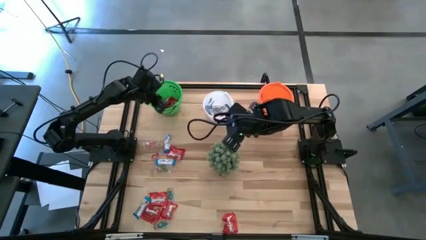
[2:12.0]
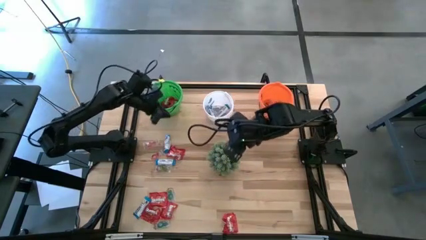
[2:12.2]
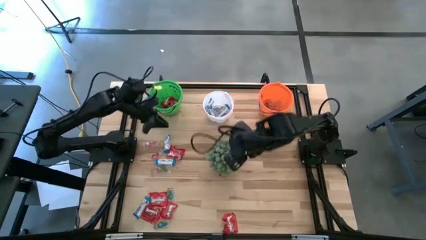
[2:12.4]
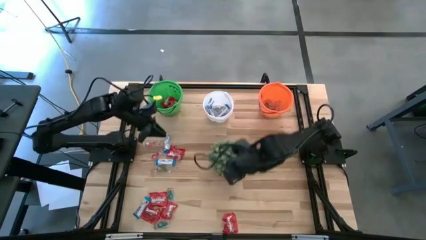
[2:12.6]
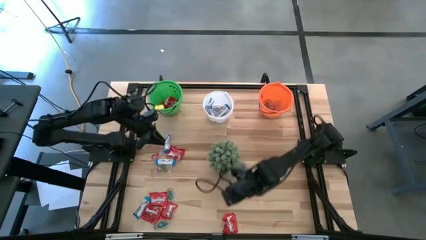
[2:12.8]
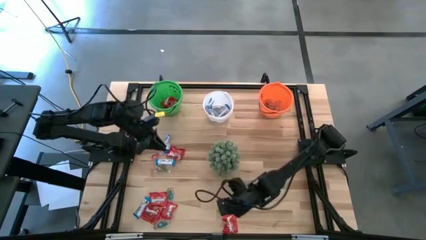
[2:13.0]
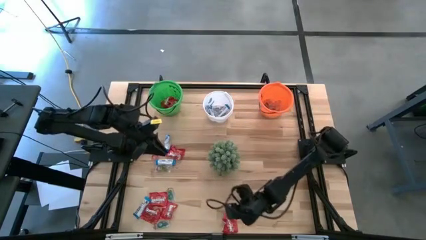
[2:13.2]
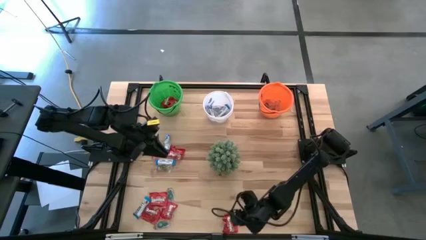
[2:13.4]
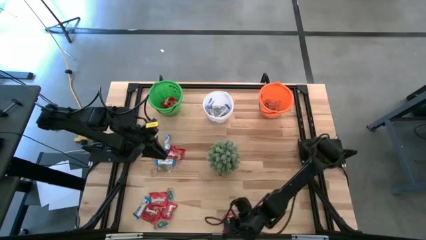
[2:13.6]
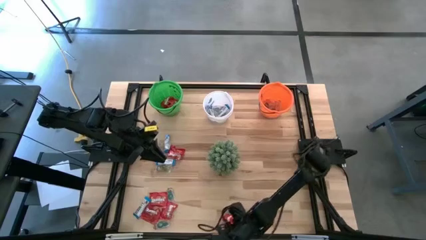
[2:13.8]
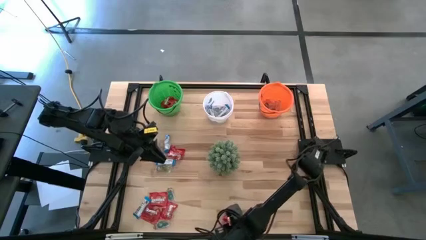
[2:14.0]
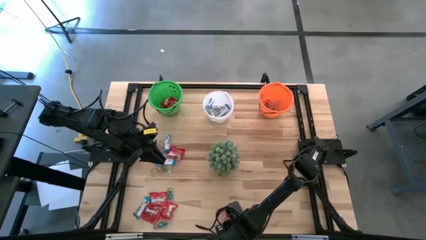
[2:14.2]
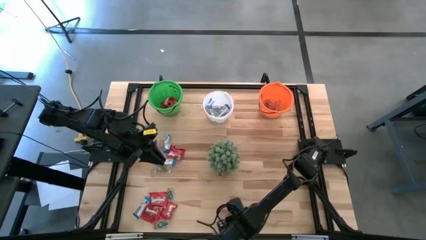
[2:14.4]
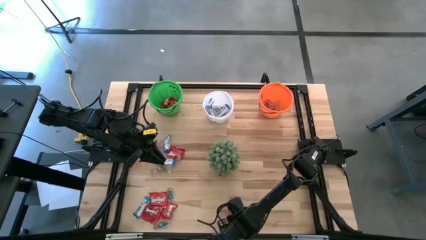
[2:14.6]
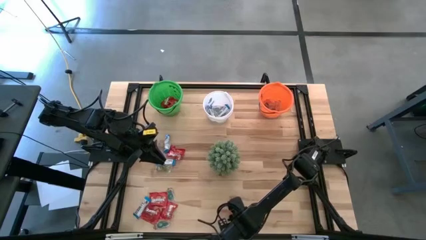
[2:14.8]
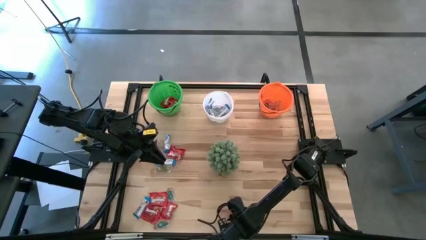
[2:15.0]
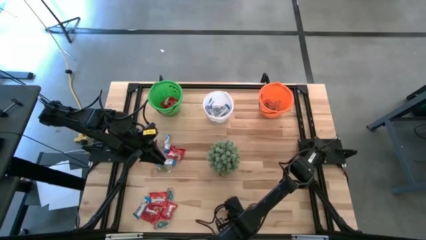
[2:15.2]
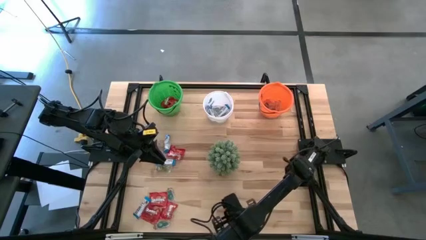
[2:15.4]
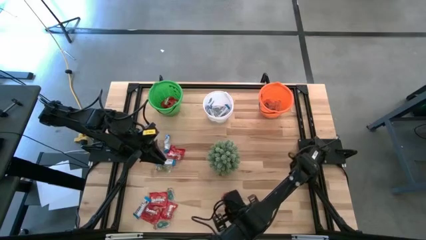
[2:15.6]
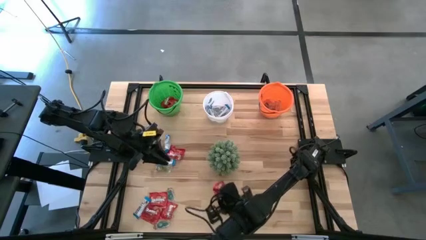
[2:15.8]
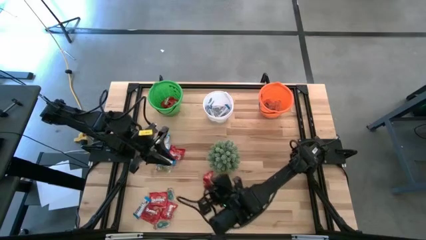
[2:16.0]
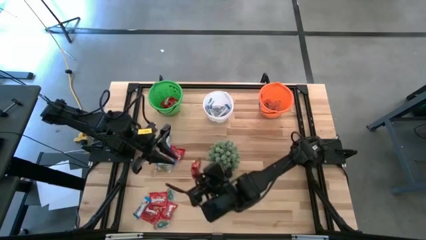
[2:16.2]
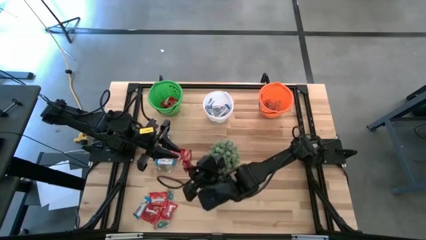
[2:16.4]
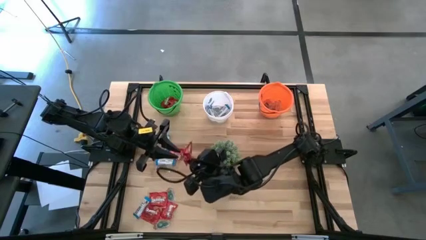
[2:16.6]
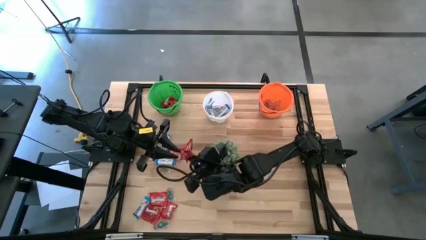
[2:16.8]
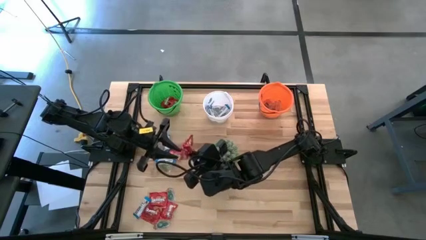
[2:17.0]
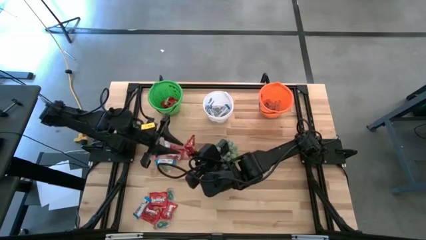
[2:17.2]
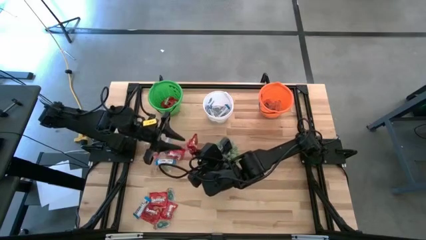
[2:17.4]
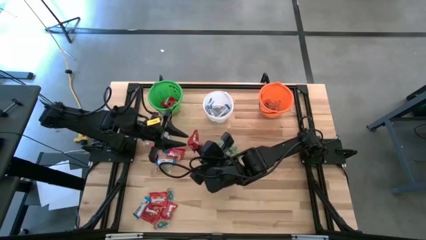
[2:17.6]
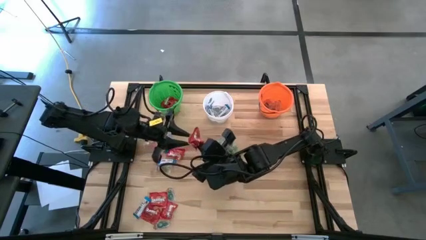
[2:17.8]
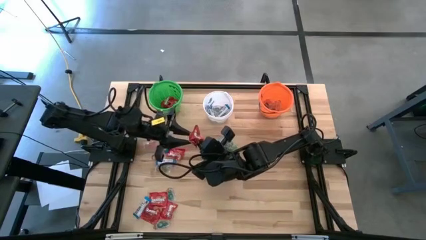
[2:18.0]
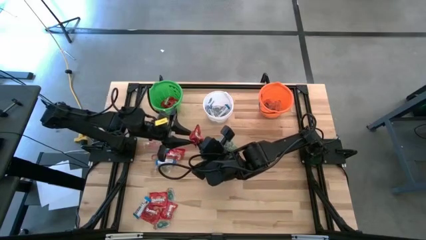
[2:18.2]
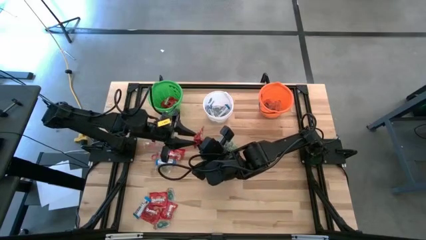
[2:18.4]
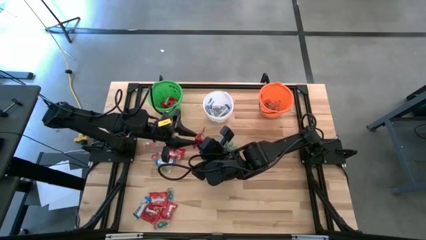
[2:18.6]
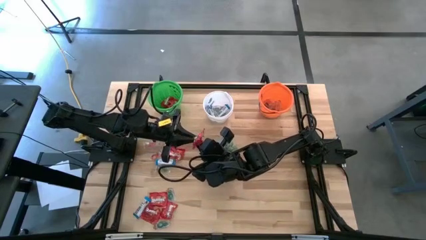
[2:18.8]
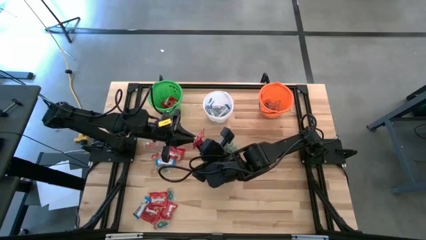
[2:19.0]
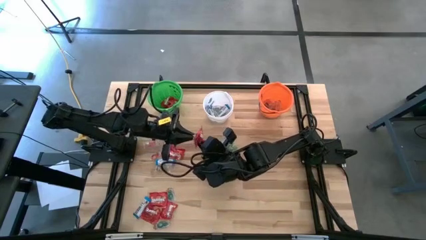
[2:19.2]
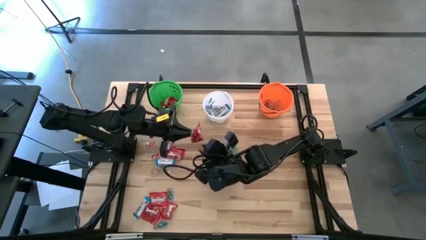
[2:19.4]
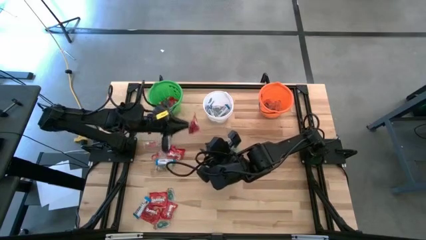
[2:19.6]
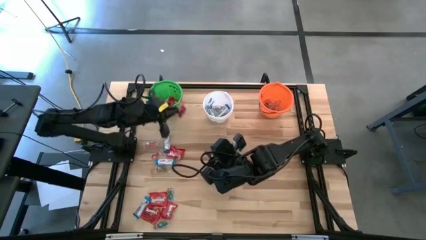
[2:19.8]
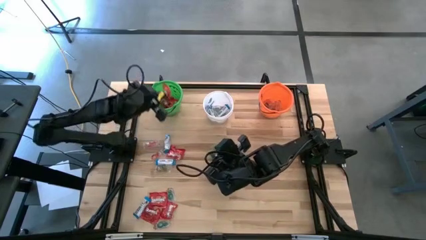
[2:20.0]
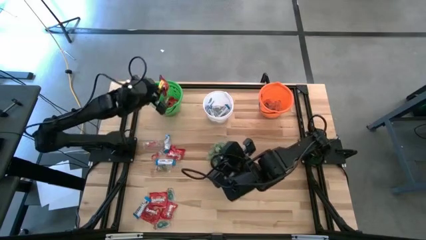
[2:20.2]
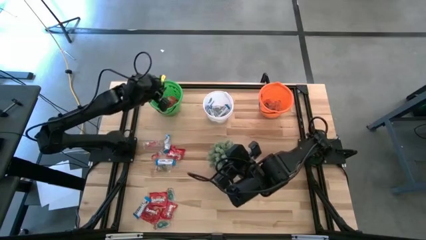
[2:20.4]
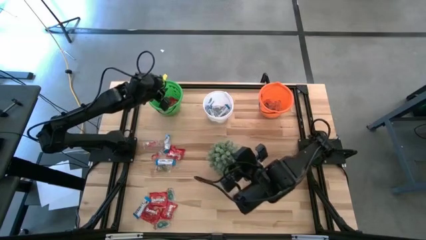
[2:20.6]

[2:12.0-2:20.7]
Task: Sort candy
Put the red candy into the green bucket

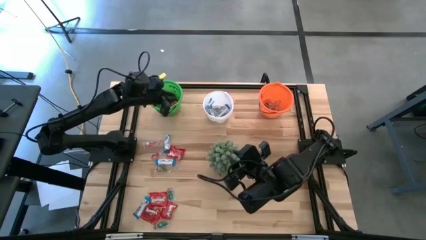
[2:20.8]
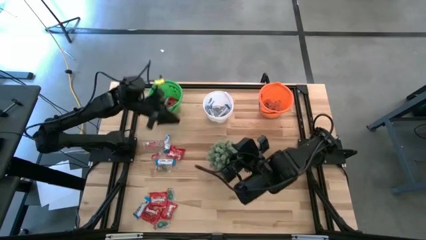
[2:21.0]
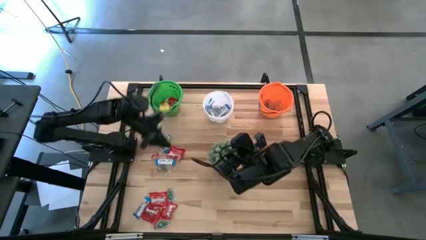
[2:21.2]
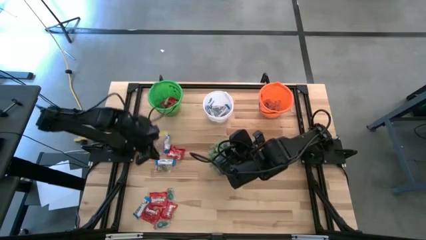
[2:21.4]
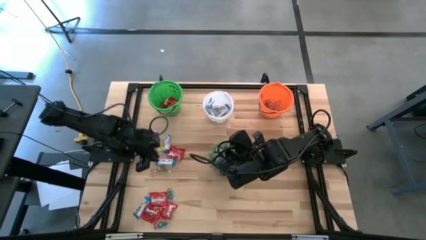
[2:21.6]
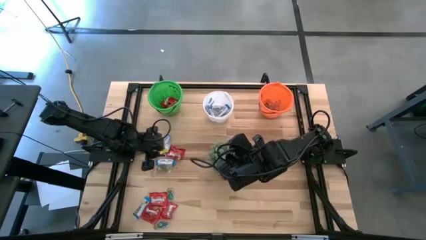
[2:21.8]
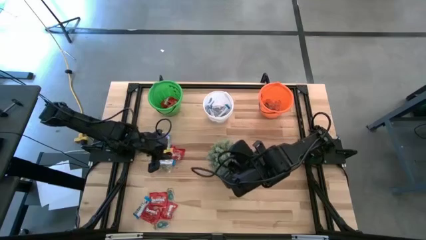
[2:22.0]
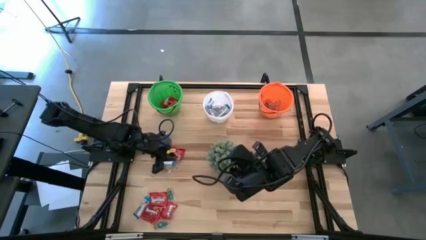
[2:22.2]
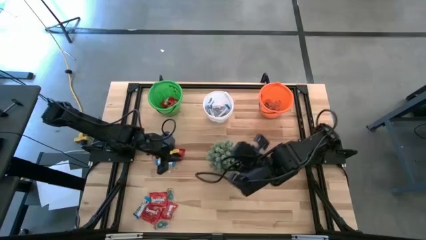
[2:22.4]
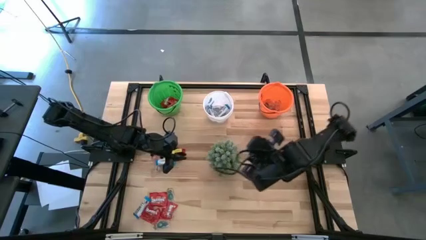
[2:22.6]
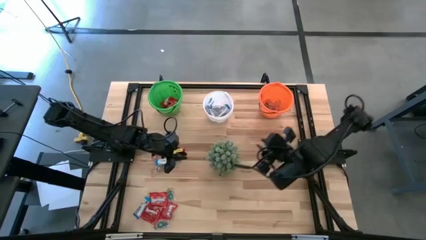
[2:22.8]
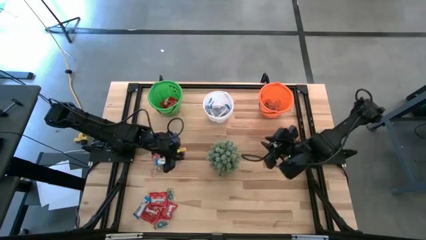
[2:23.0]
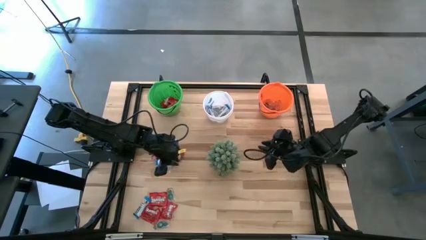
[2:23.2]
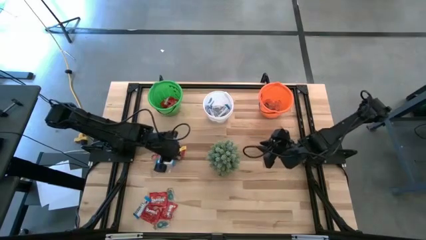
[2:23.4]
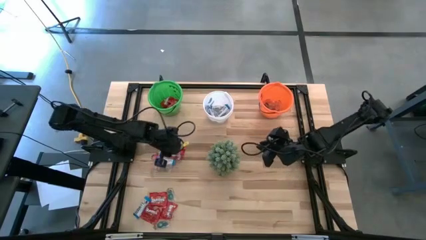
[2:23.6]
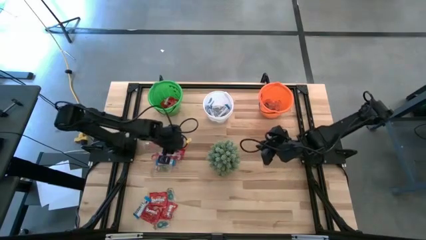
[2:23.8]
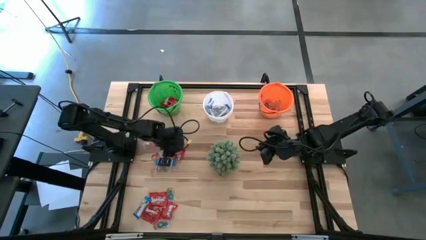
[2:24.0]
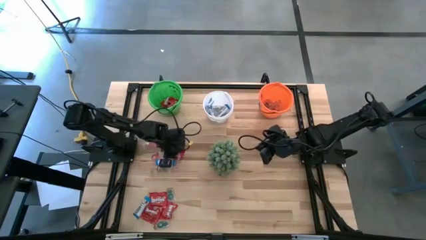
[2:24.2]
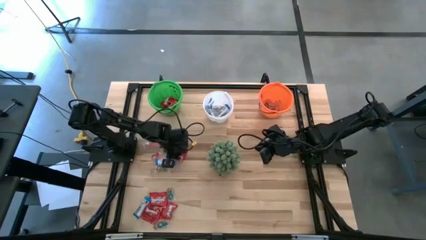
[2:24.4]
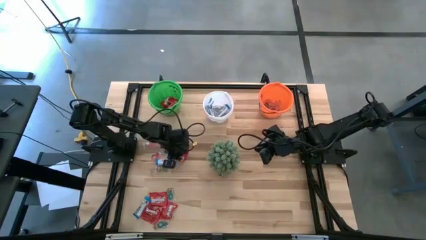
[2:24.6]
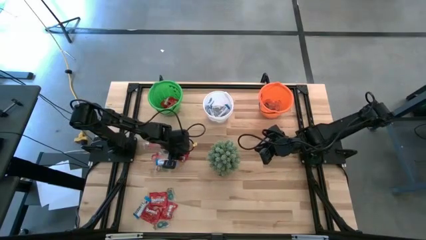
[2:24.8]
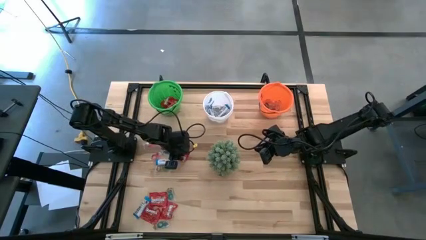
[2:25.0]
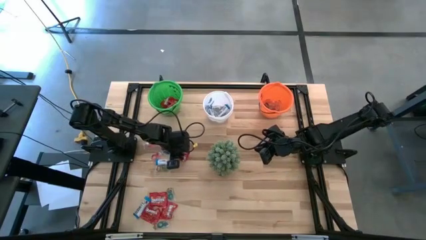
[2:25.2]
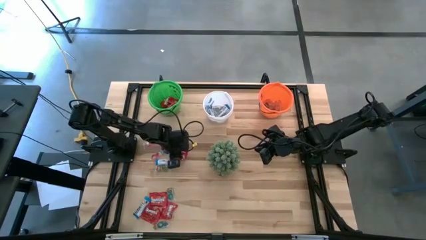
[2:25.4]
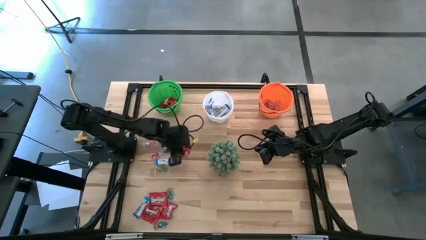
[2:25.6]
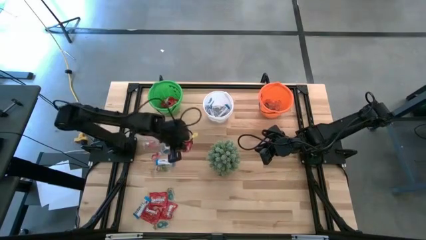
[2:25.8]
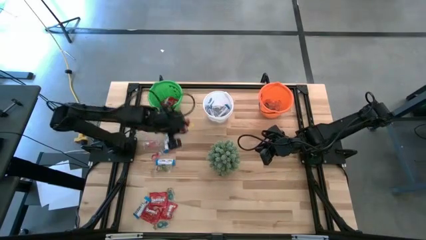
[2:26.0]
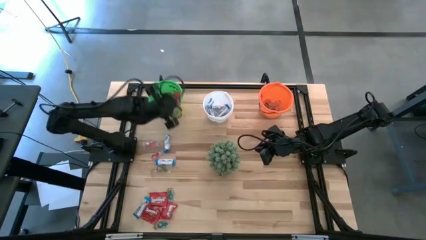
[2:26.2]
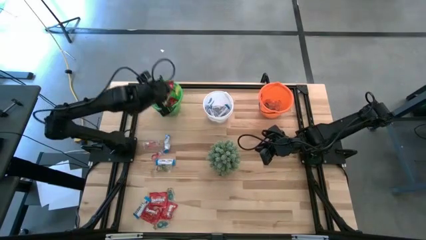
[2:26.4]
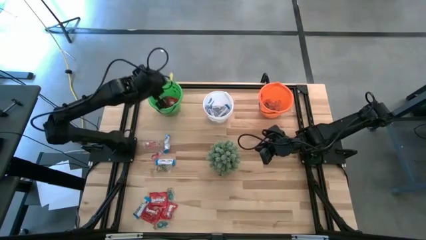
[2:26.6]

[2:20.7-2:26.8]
Put the red candy into the green bucket

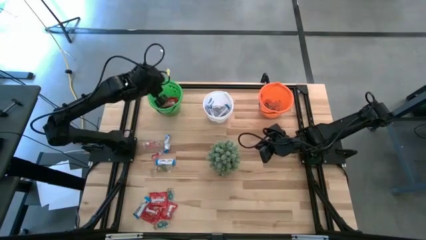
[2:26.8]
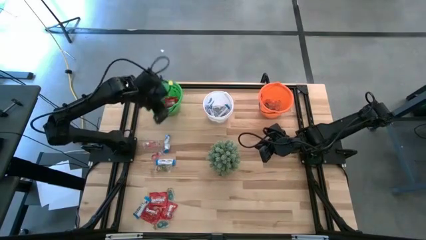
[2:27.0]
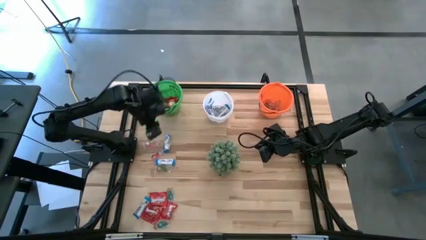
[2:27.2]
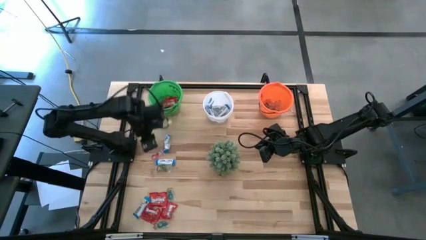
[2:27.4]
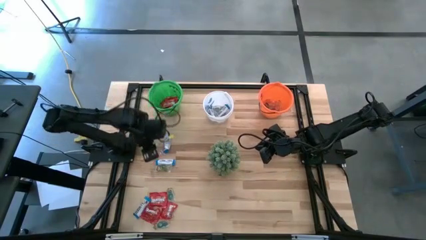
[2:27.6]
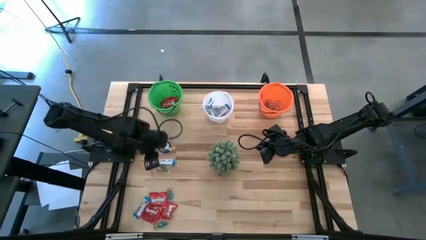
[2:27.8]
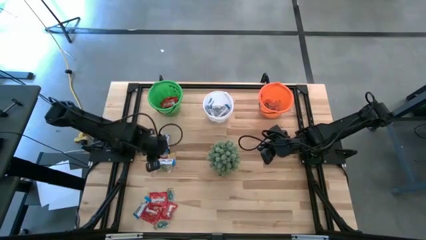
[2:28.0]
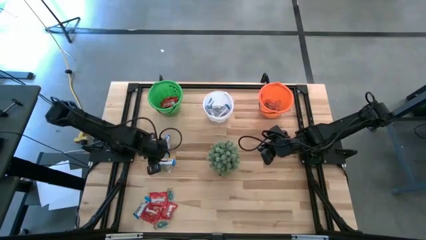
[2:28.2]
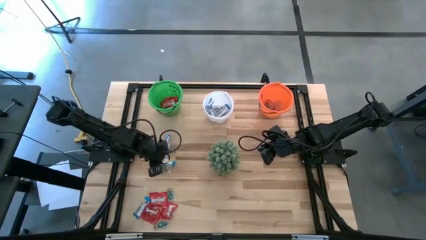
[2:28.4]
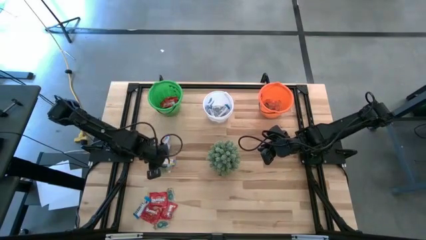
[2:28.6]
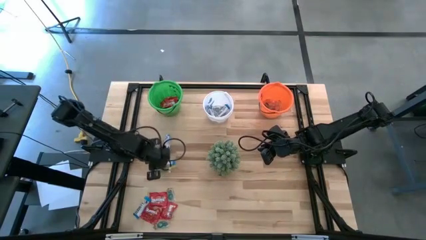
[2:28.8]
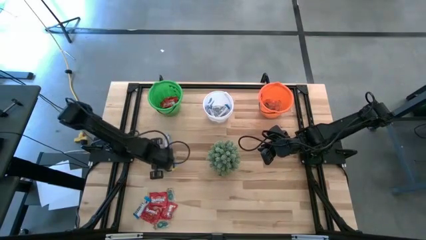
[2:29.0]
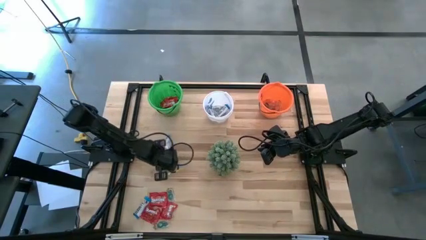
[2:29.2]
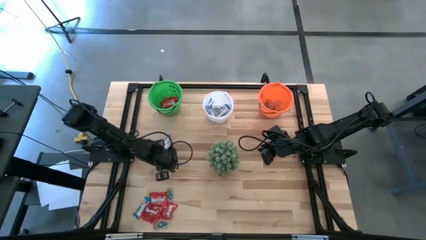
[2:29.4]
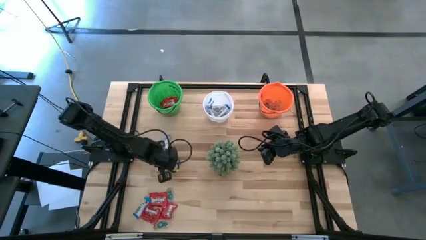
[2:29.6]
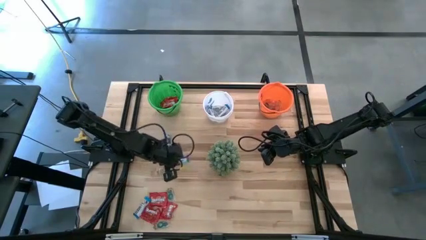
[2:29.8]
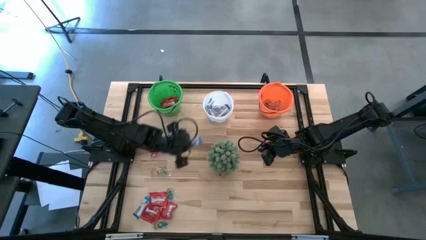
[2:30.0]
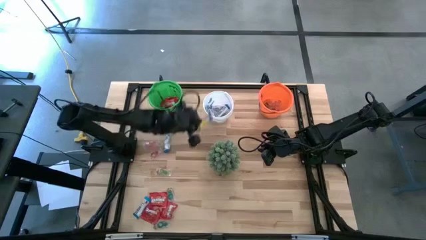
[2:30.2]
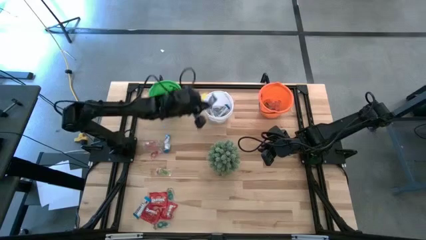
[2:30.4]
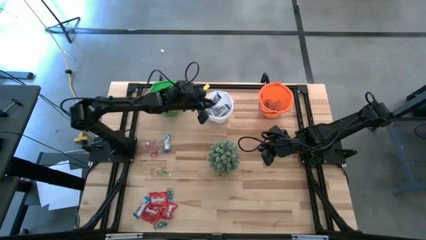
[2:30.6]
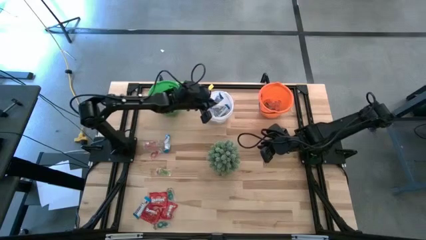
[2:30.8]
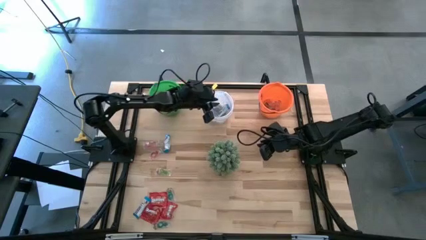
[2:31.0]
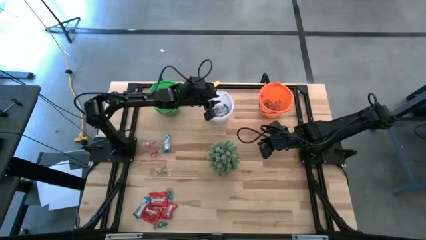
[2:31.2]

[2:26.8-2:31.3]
Put the white chocolate bars into the white bucket
